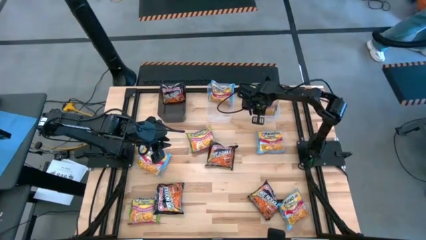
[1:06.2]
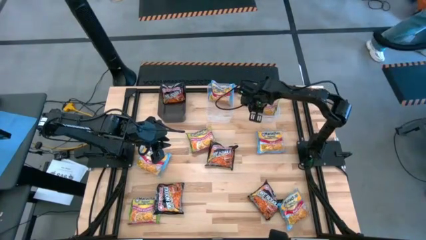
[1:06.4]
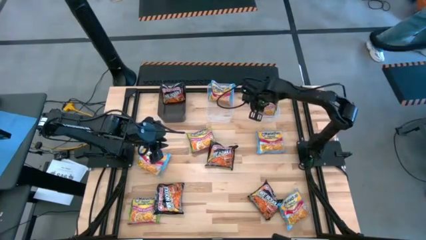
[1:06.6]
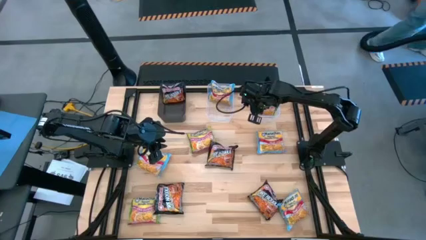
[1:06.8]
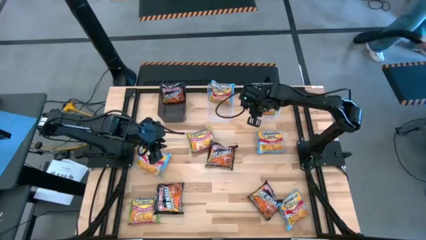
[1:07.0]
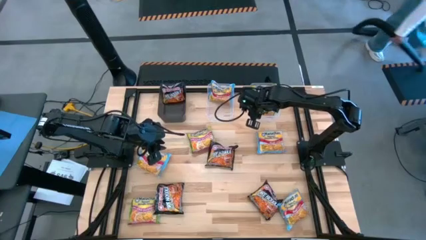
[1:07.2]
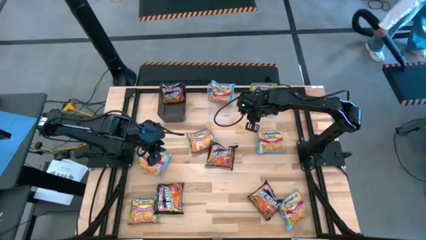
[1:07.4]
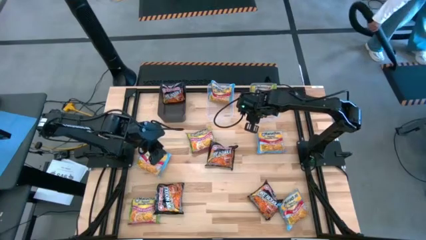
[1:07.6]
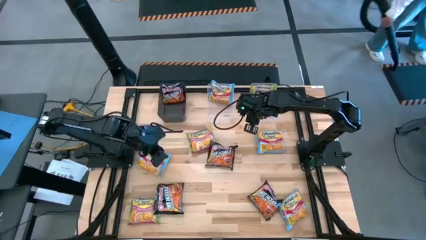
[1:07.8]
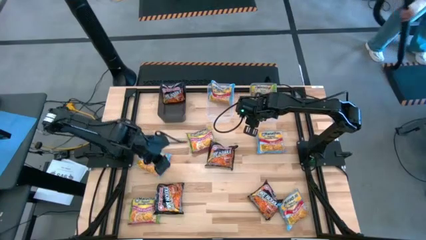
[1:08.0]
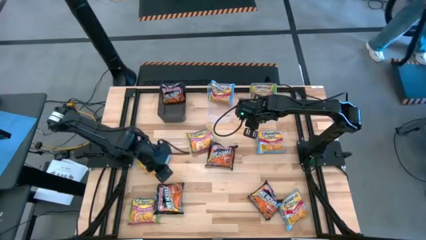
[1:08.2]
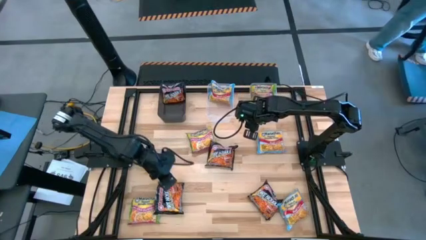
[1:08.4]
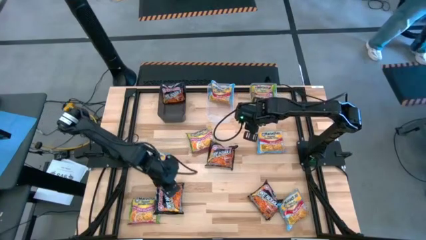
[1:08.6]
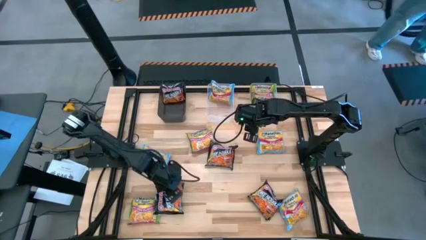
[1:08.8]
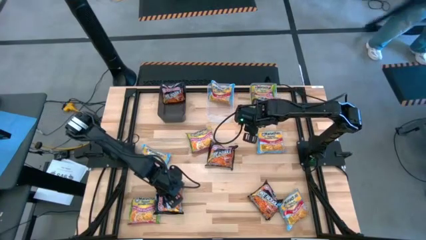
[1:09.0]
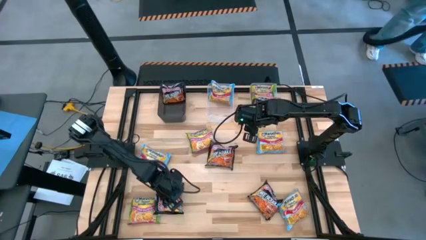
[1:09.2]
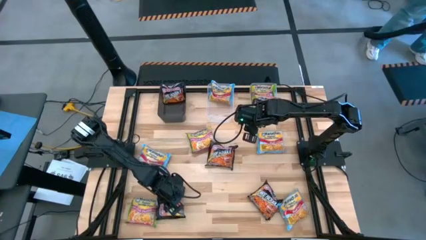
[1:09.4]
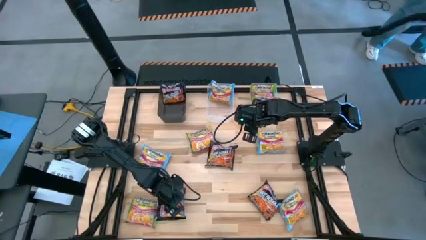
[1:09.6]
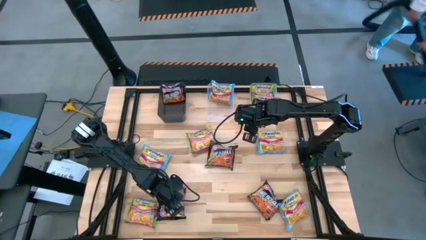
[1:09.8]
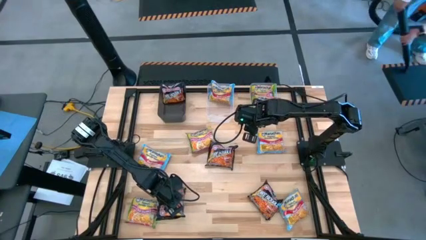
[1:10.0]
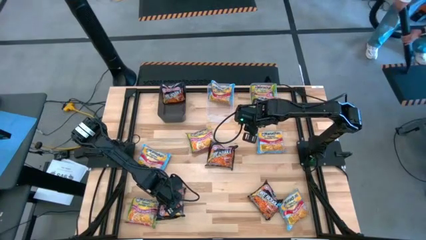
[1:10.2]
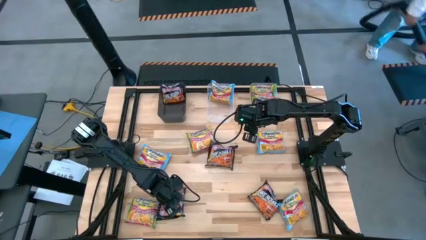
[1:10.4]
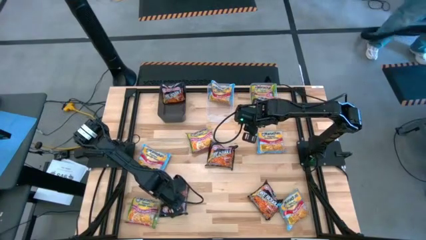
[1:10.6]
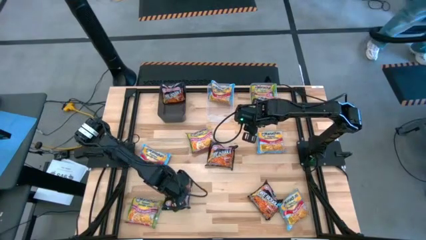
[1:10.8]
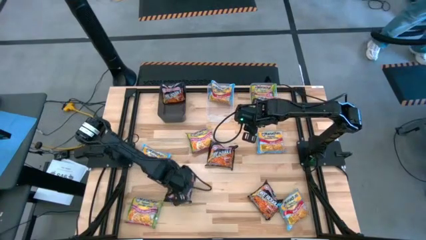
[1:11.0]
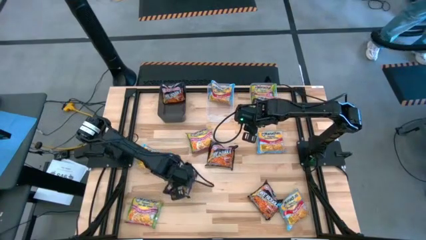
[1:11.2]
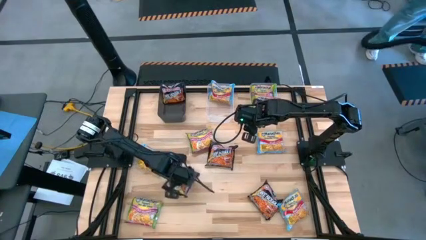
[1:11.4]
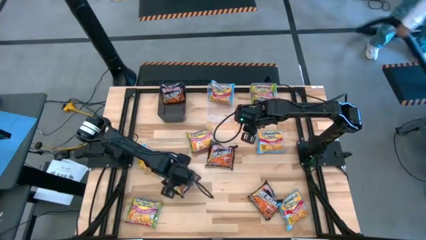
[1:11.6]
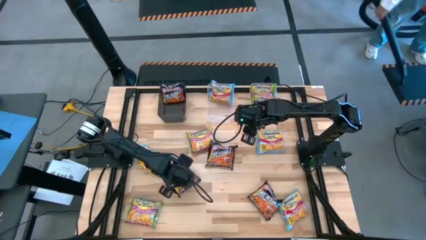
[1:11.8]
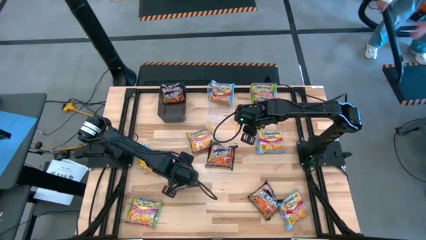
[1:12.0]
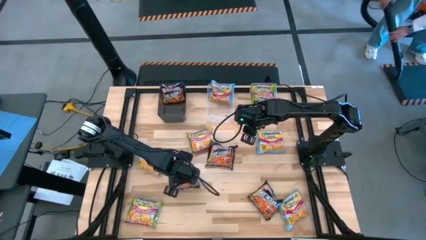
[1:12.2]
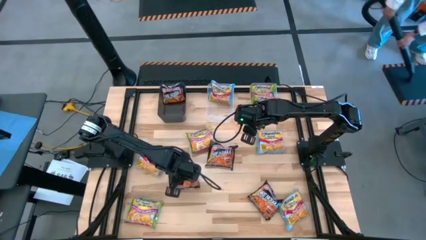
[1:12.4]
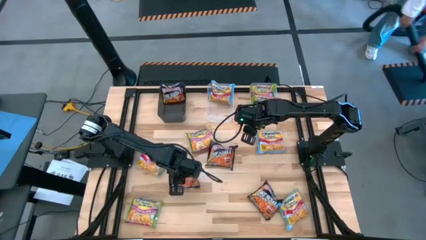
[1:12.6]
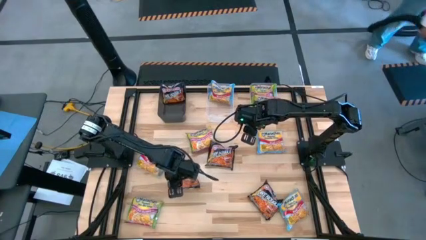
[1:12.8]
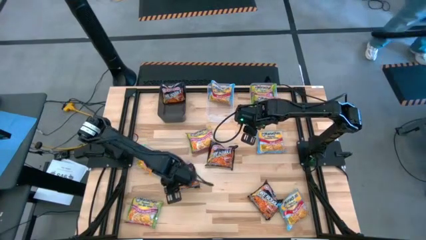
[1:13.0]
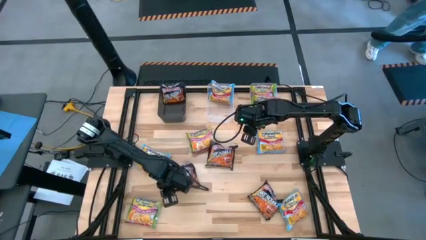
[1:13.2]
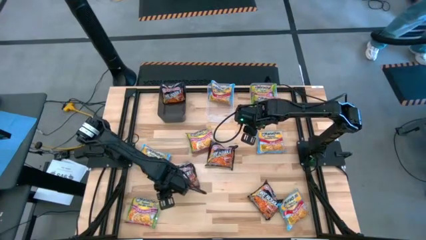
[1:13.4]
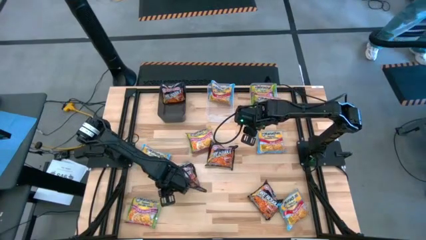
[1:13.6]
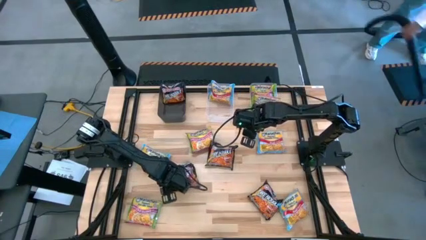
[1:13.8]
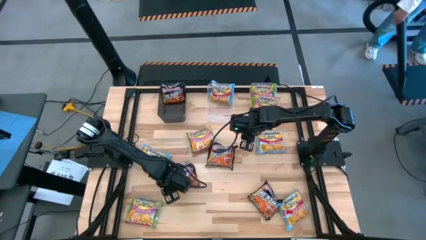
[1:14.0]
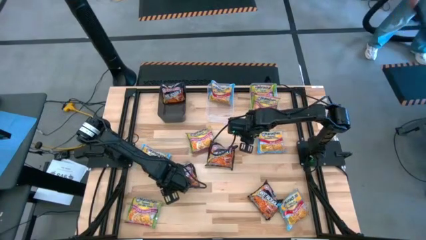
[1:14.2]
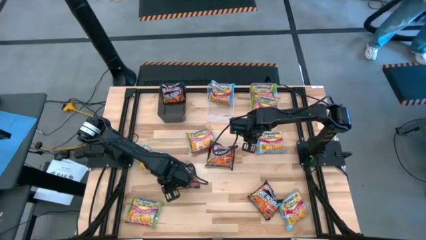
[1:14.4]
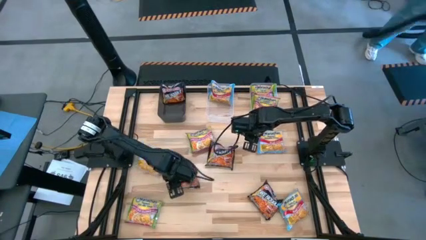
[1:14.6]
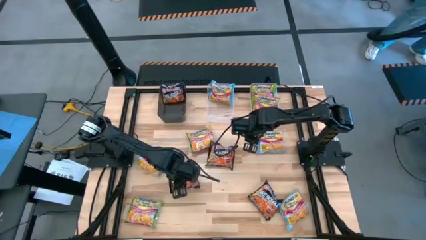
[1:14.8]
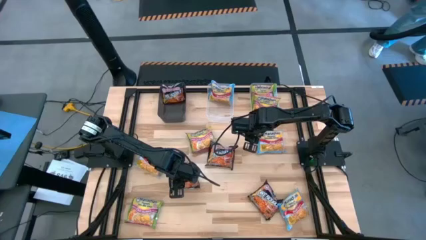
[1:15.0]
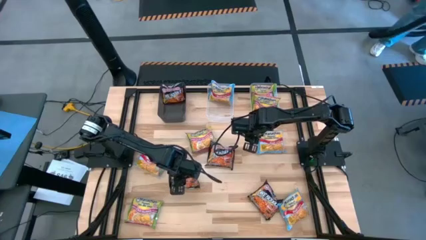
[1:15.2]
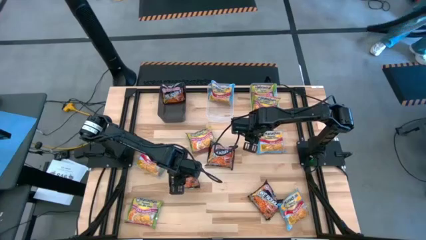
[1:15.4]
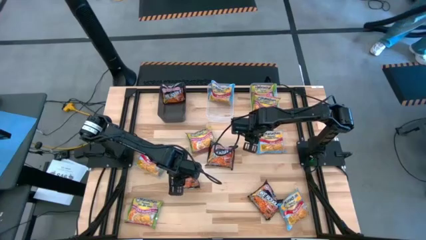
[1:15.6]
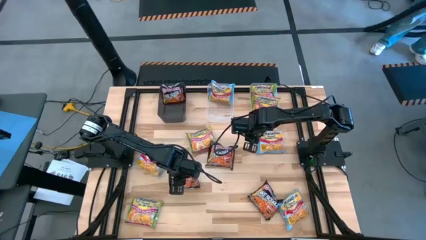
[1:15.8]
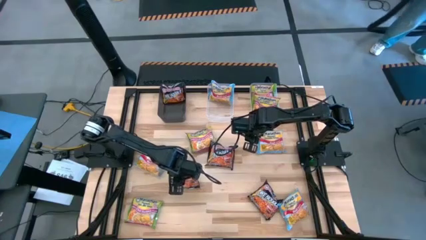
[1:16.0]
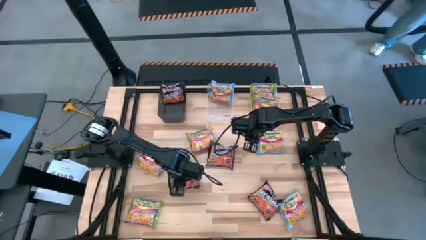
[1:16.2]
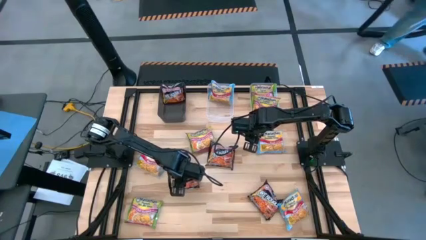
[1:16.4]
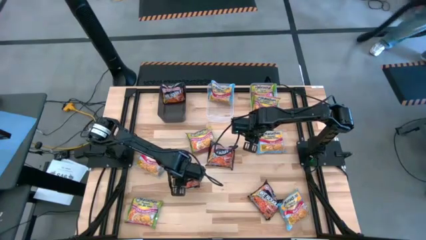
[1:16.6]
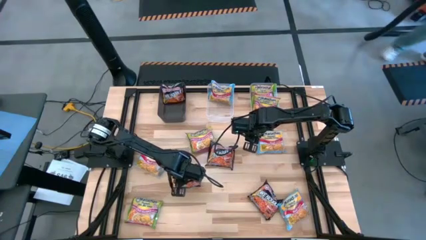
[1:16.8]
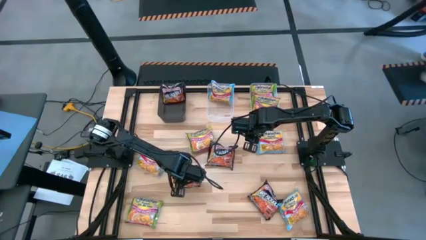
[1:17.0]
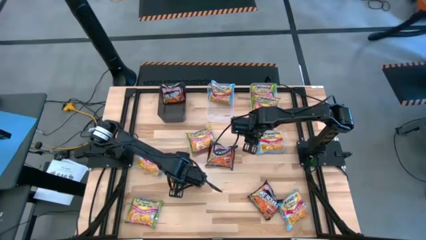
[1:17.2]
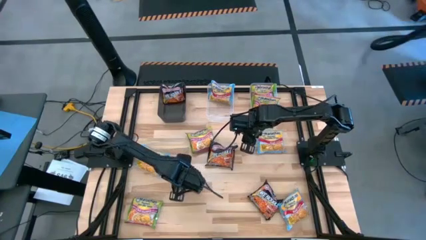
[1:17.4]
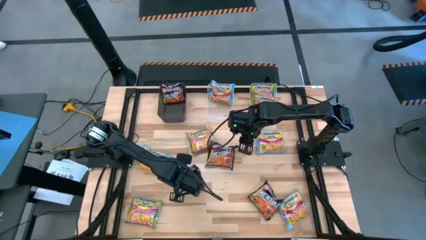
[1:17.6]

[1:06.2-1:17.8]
Task: Sort Maruchan noodles
Put the bottom left black noodle pack into the black bin

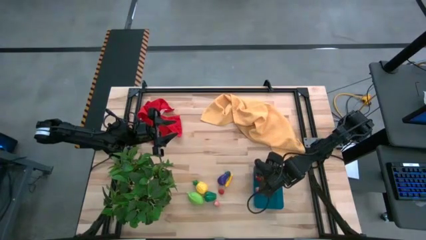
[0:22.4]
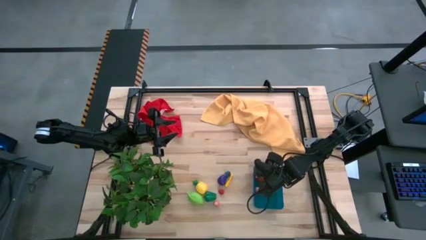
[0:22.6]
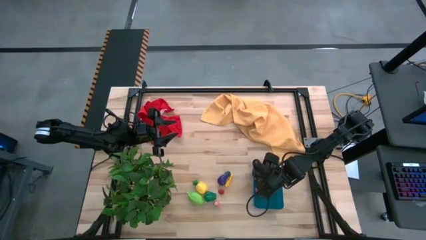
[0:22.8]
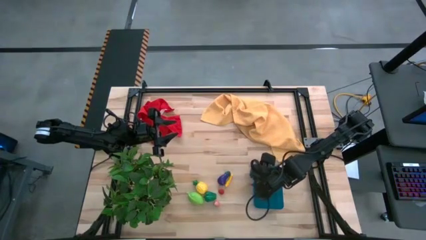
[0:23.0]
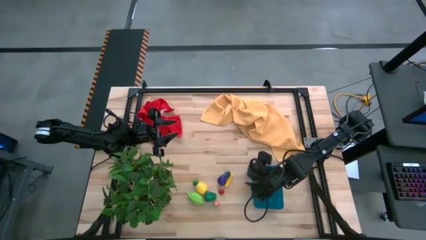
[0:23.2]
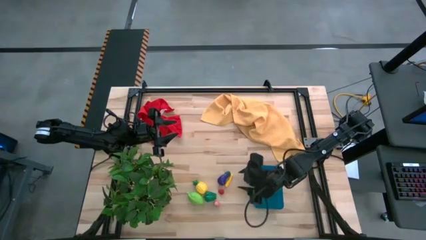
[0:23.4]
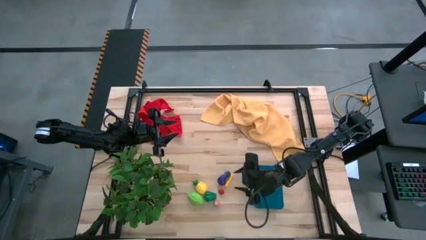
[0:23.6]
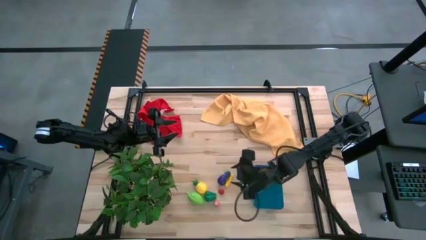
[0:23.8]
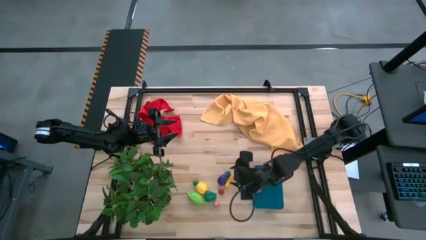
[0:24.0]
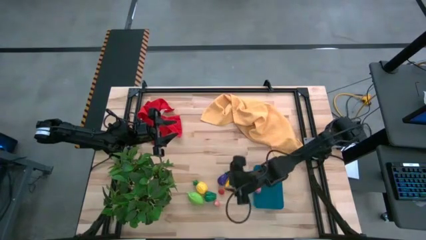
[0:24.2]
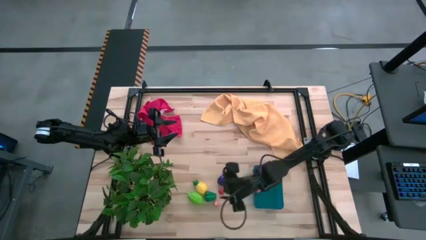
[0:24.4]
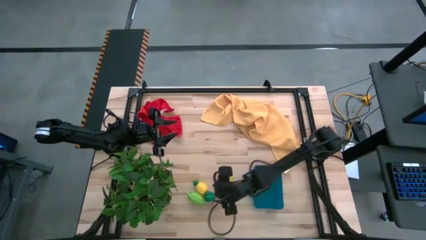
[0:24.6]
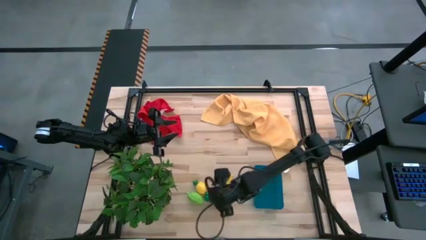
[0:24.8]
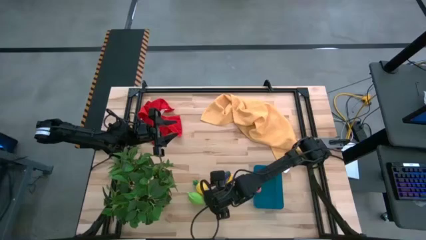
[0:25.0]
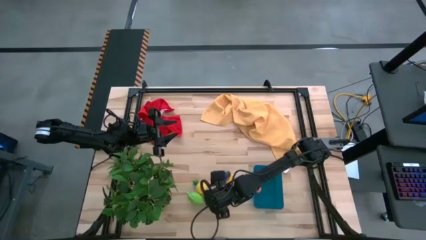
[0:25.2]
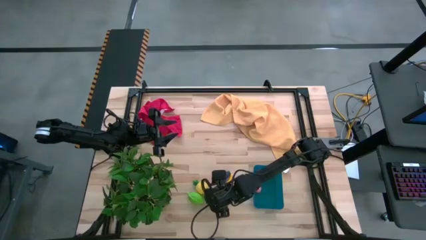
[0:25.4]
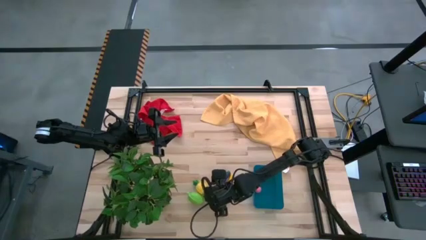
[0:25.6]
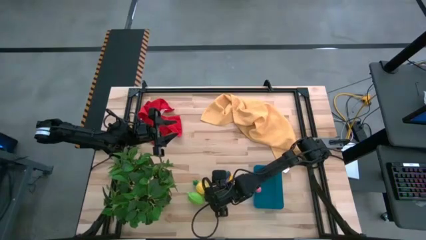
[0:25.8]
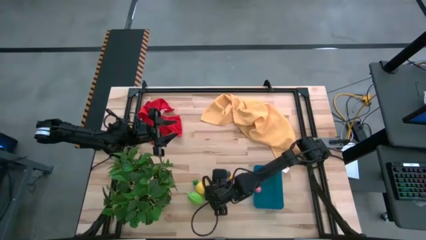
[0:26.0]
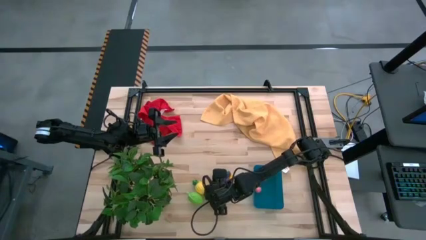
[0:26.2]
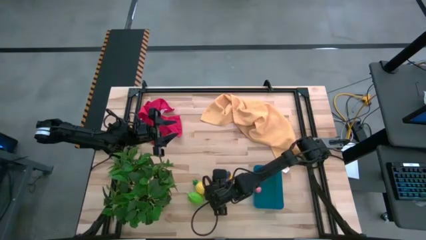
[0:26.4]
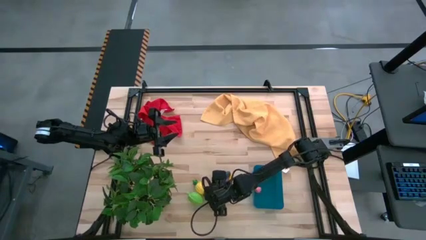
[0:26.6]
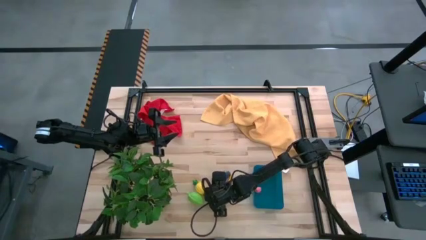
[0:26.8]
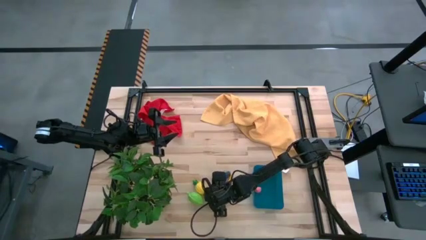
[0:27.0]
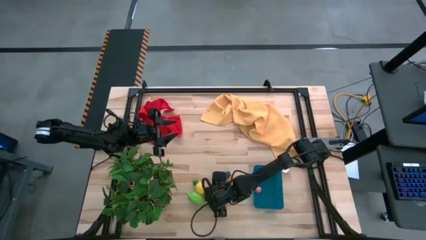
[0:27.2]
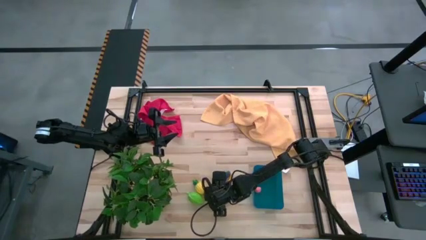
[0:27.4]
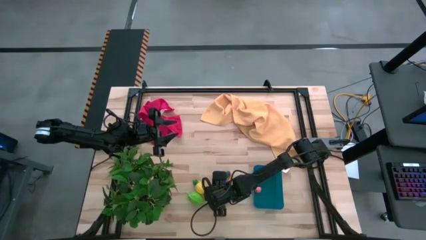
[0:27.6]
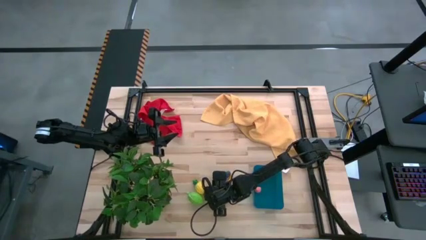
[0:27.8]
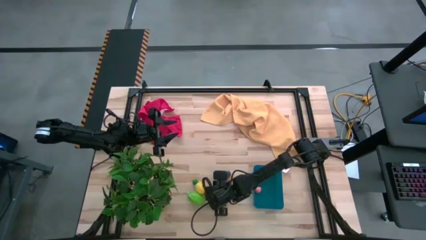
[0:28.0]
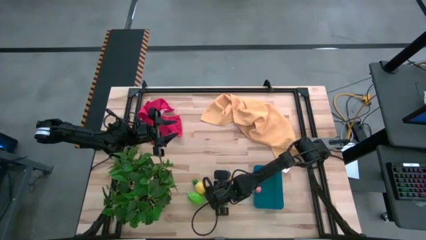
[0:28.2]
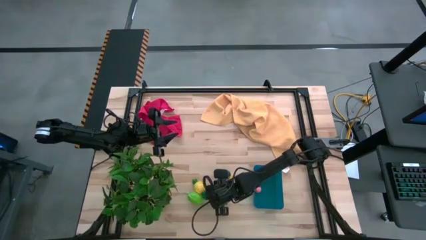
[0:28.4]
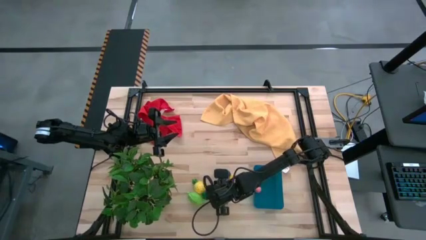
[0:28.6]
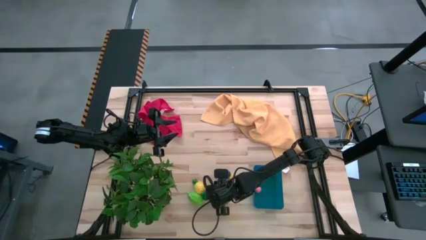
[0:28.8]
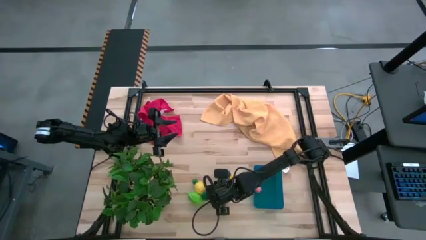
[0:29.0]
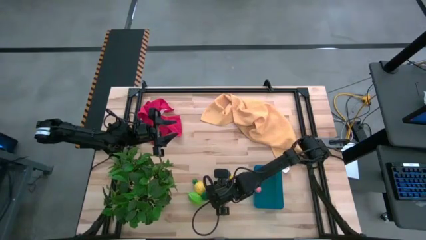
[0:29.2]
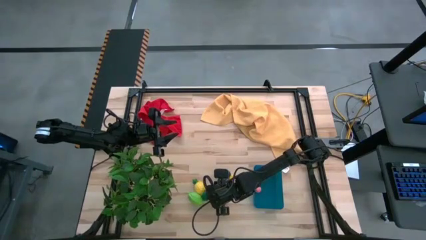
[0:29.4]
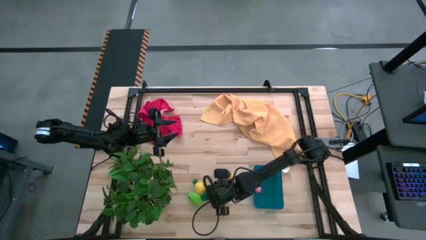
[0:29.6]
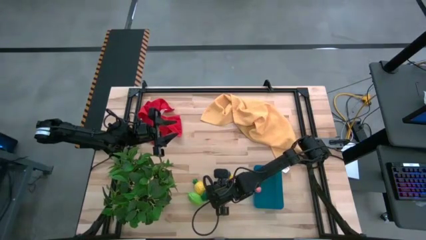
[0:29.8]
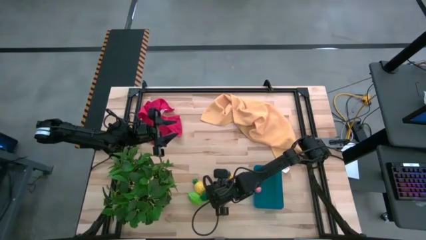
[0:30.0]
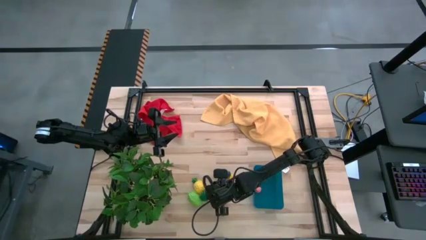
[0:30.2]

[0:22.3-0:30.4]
Task: Pick and placing Produce into tupperware
Put the green bell pepper into the blue bin
